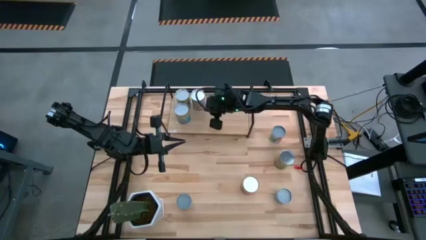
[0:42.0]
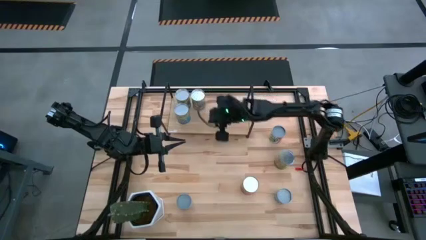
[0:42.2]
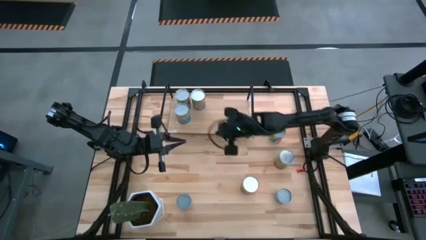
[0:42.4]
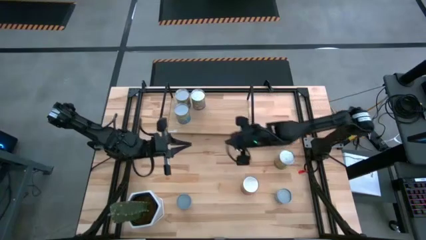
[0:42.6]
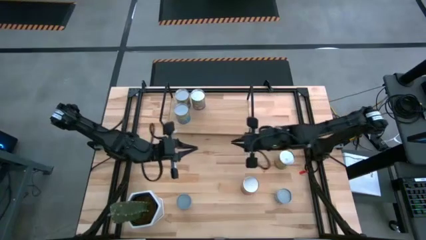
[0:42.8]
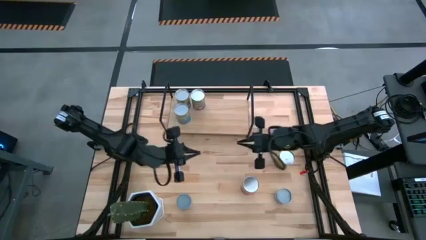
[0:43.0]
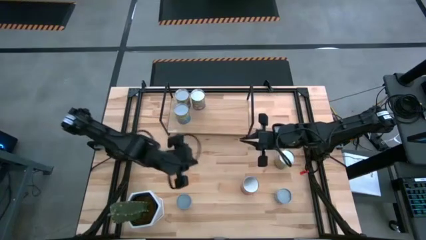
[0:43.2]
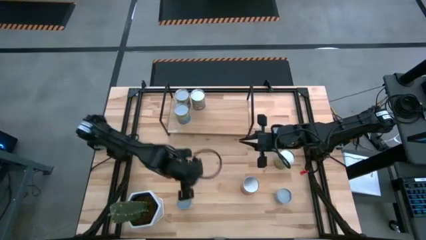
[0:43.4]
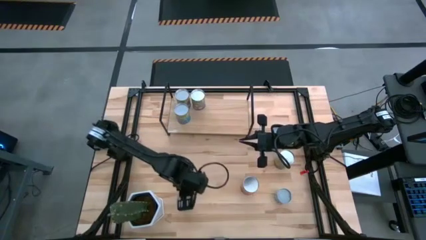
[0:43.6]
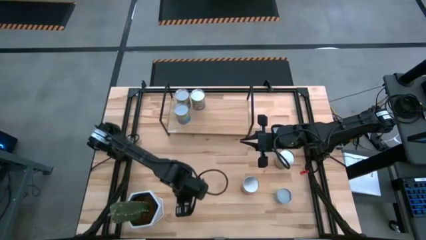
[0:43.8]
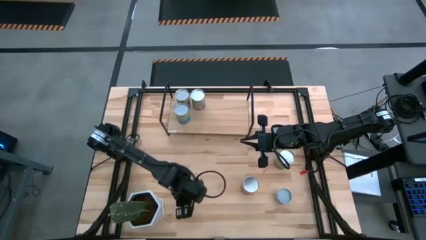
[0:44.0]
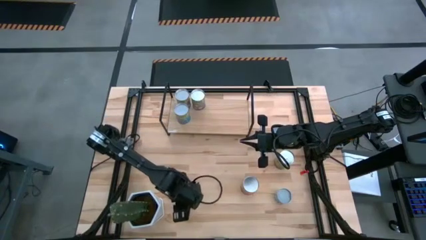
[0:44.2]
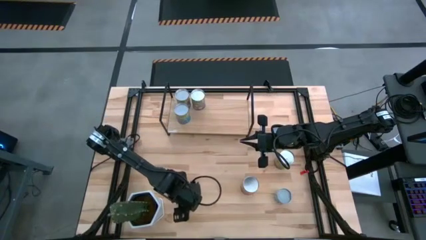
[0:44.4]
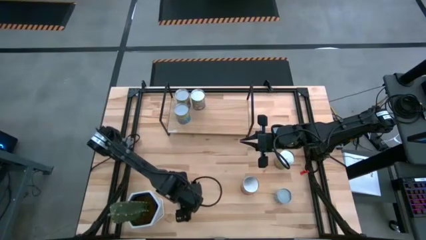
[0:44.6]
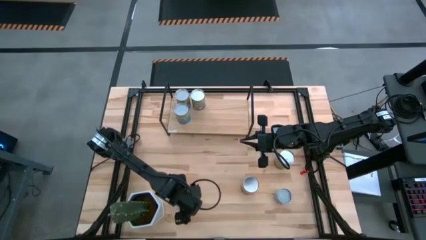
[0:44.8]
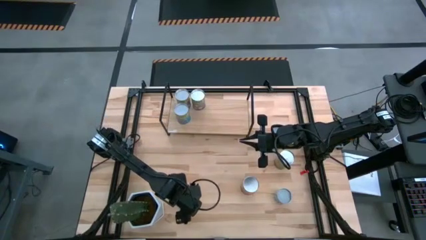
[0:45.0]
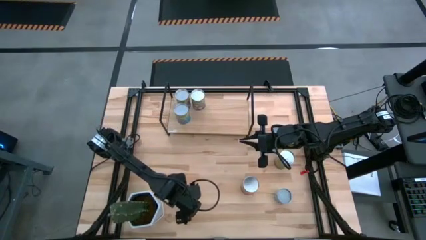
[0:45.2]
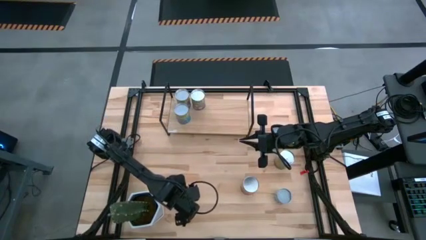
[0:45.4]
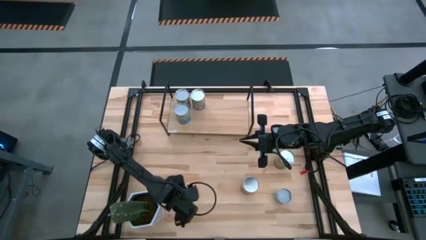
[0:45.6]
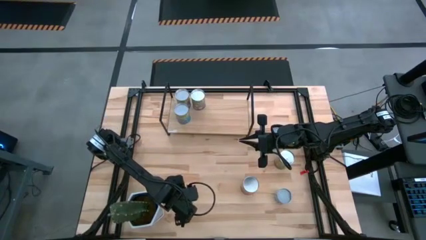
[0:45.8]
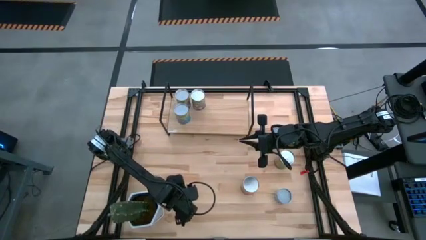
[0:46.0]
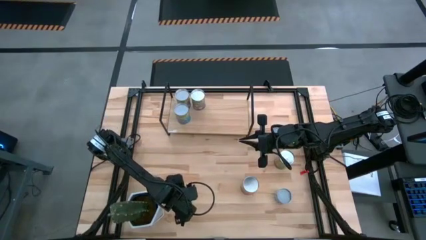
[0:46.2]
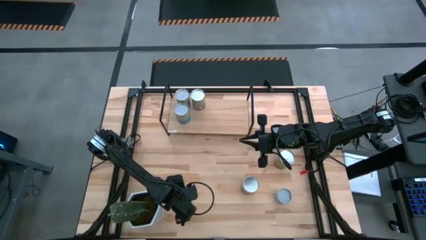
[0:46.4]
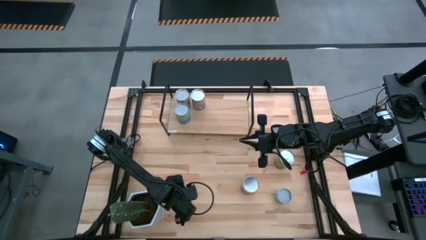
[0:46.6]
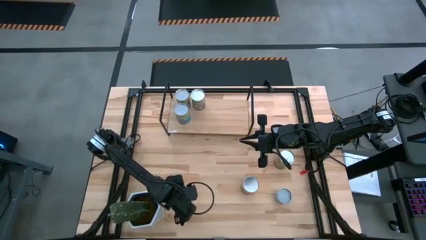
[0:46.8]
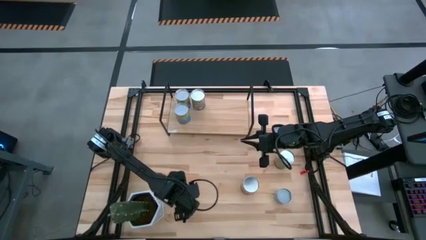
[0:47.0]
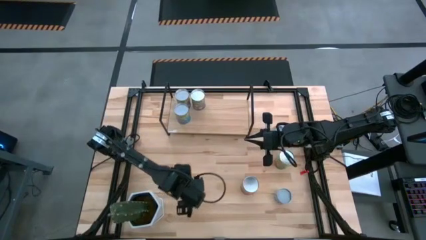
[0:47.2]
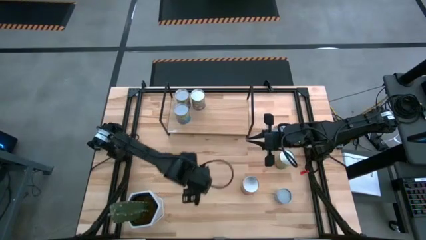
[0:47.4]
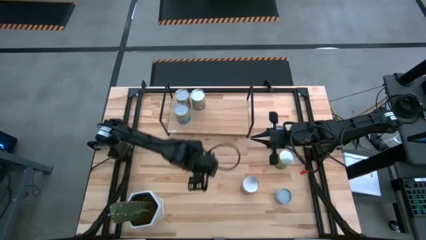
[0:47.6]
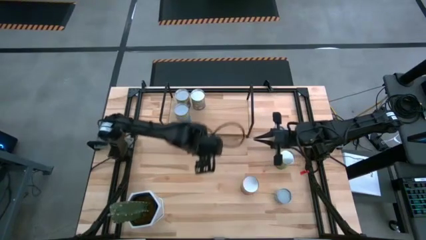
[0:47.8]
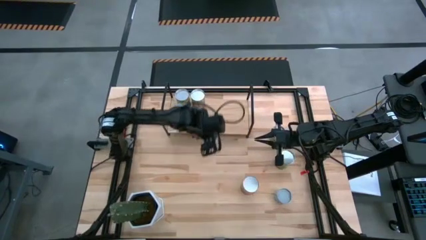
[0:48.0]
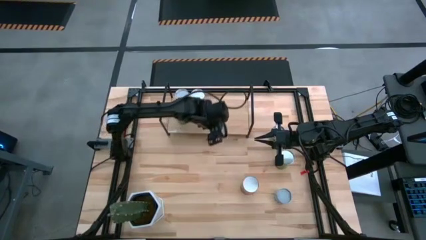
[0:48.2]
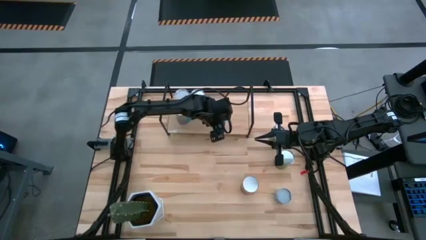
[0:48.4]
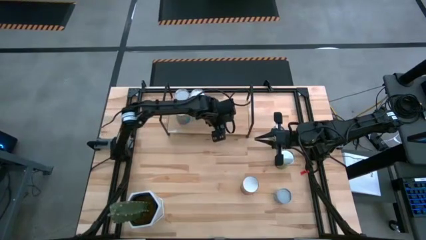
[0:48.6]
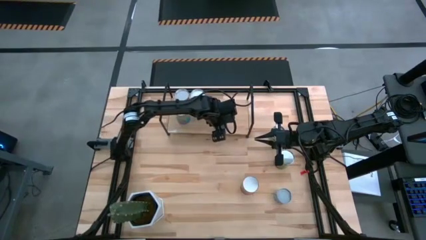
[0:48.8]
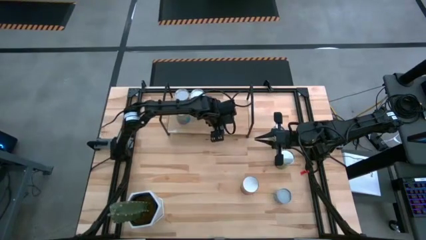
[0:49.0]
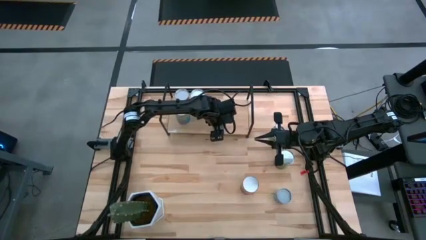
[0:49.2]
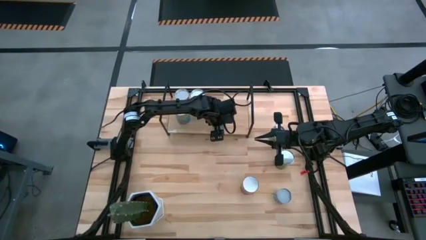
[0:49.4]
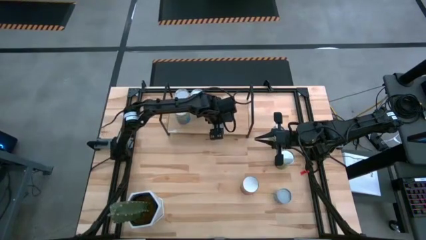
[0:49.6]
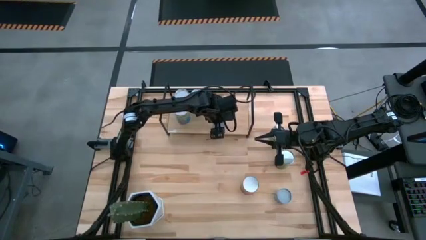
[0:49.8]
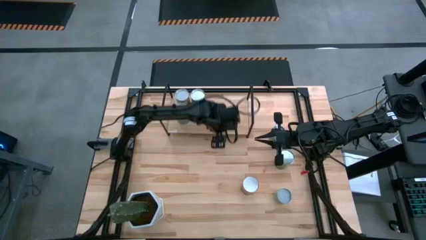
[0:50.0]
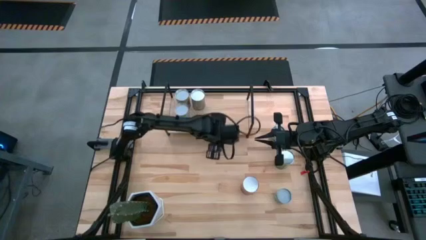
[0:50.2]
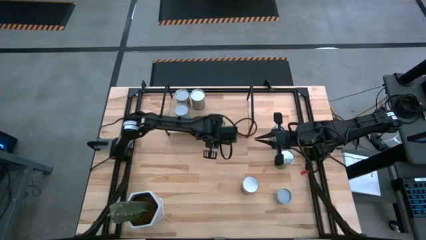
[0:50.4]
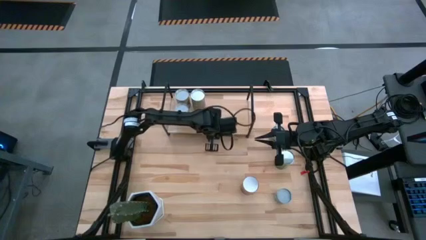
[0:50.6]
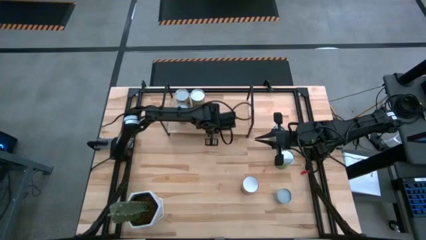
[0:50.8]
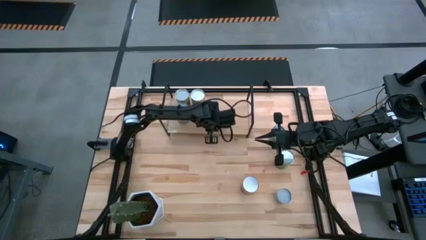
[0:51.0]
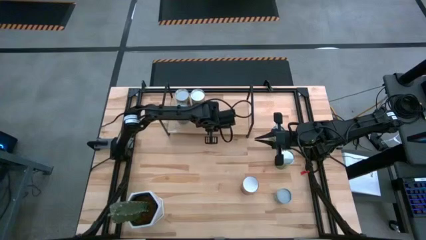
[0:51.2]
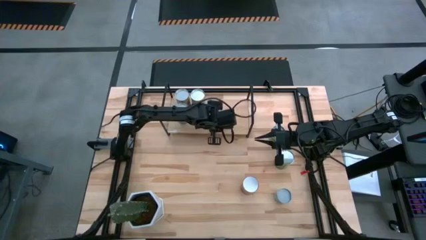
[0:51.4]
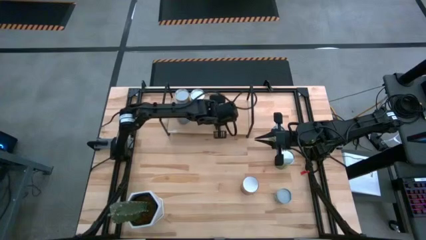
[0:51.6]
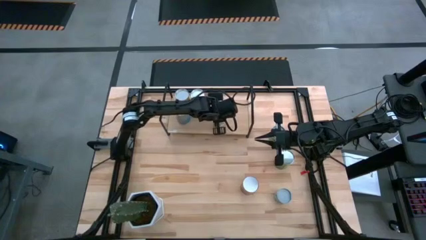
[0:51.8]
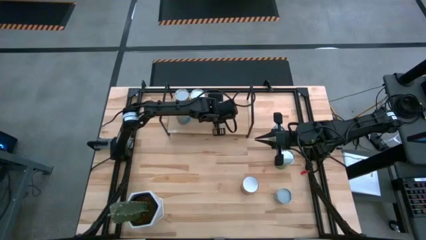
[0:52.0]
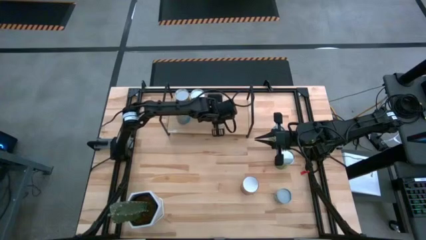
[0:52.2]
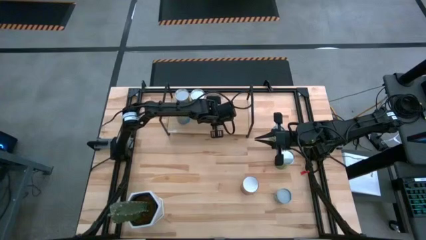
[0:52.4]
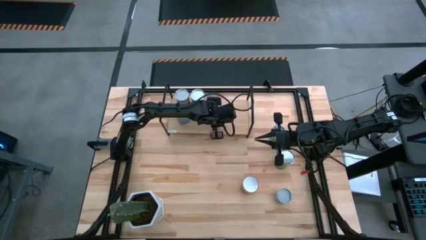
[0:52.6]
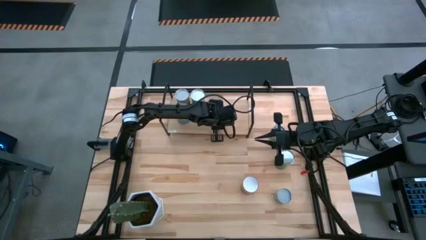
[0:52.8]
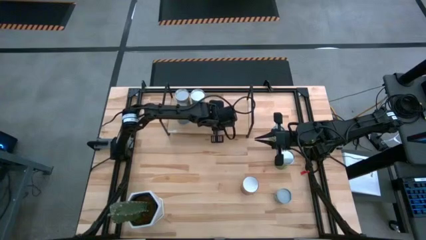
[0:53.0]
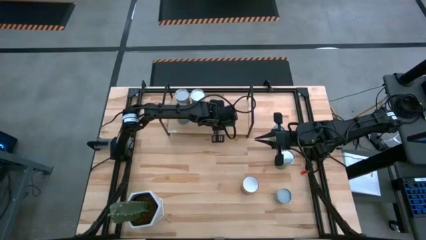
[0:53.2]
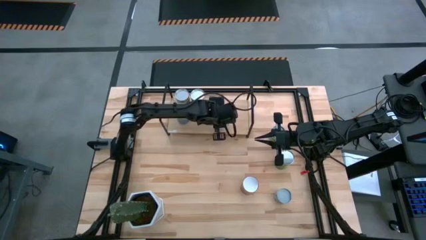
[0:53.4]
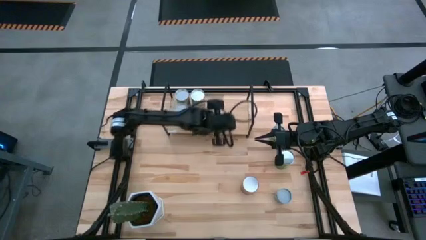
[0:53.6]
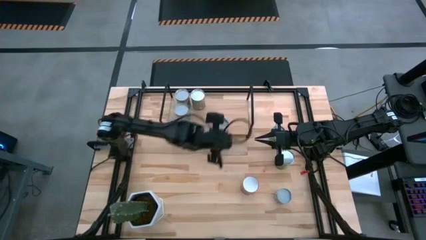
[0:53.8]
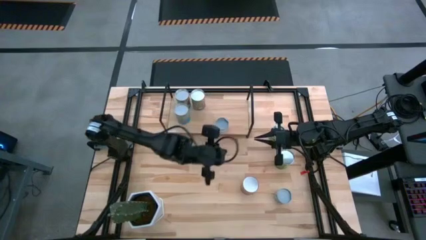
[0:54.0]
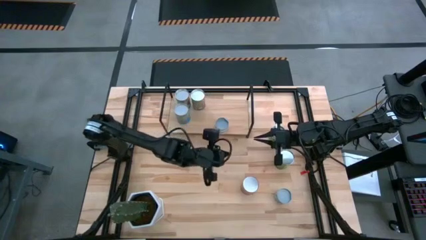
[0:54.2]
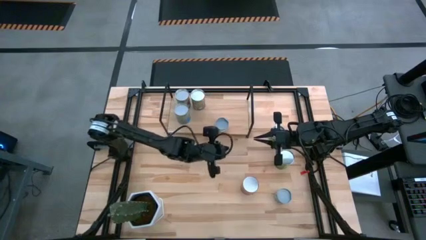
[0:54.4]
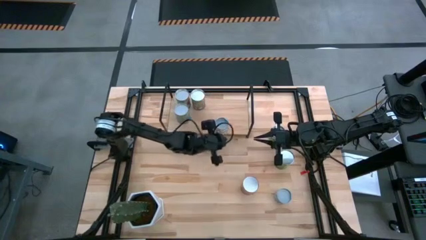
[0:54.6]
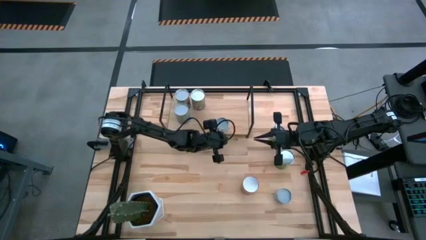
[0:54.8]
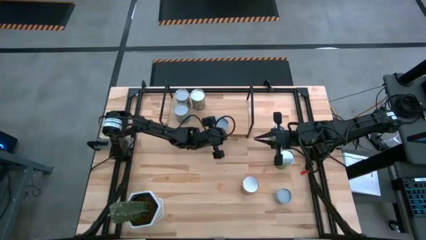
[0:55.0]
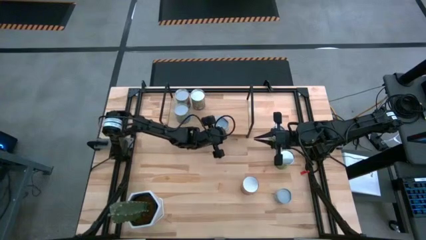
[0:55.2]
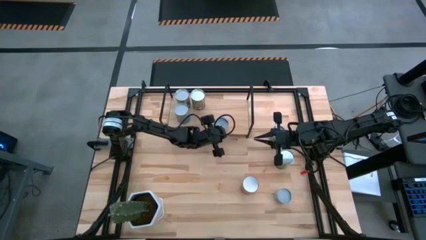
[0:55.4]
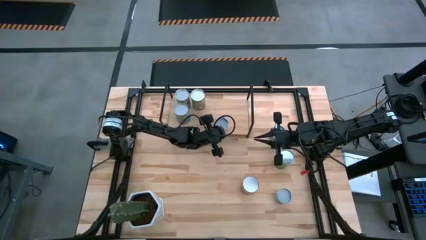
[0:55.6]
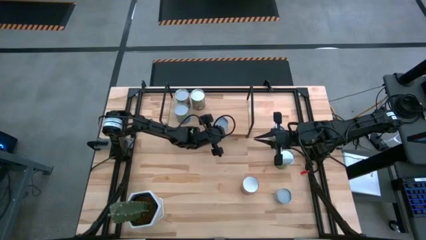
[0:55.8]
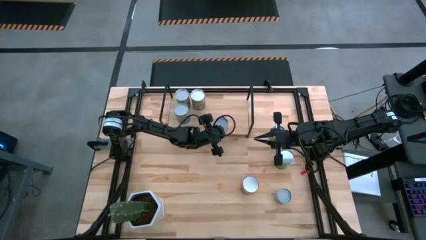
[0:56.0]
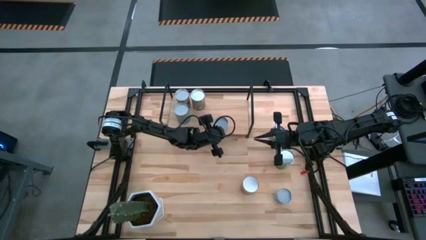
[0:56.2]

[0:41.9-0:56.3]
Task: Pick and place cans onto a shelf
Put the small canned oranges on the shelf
